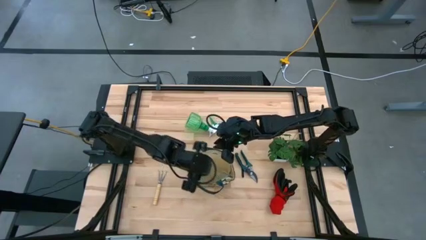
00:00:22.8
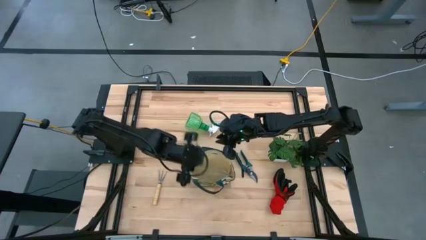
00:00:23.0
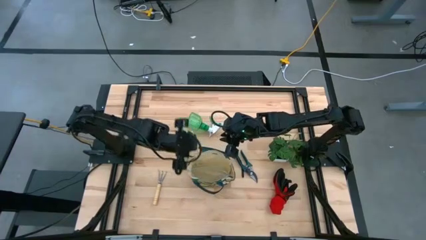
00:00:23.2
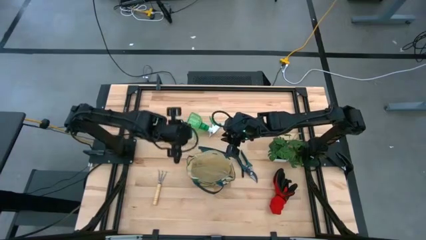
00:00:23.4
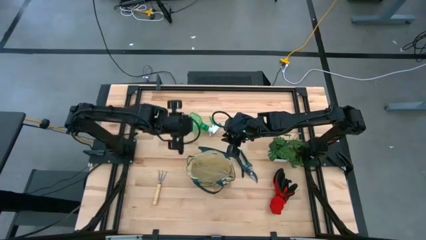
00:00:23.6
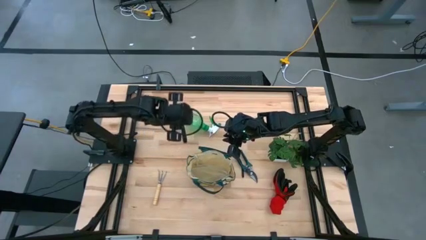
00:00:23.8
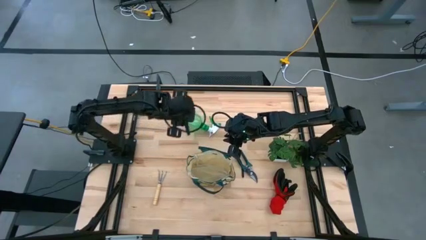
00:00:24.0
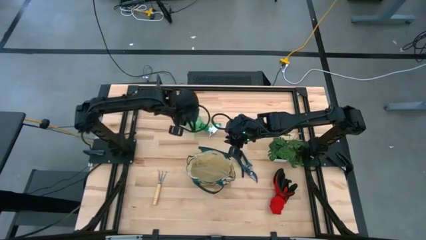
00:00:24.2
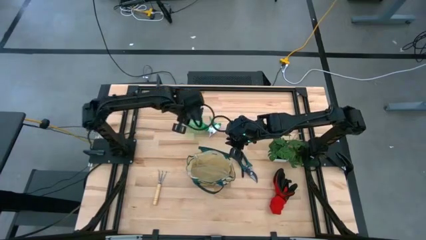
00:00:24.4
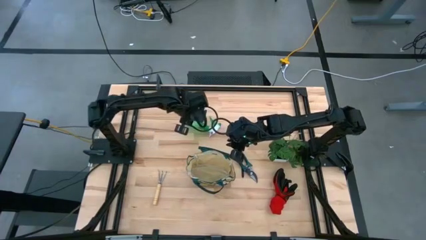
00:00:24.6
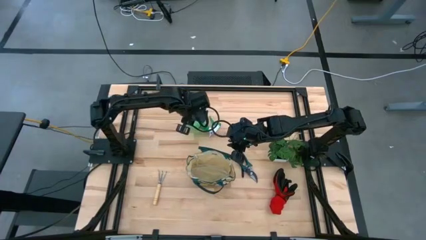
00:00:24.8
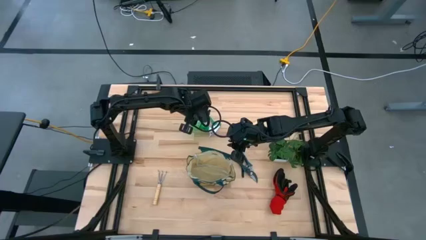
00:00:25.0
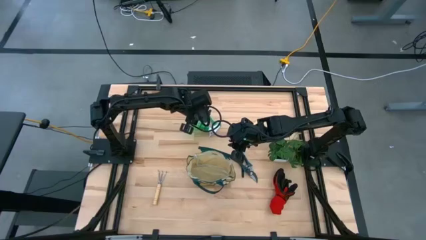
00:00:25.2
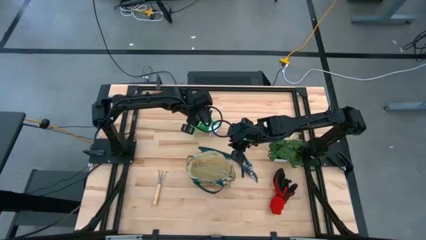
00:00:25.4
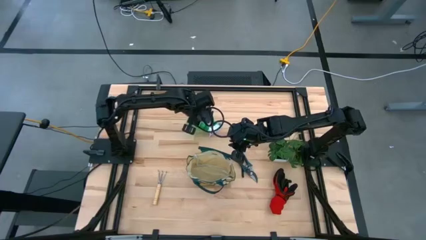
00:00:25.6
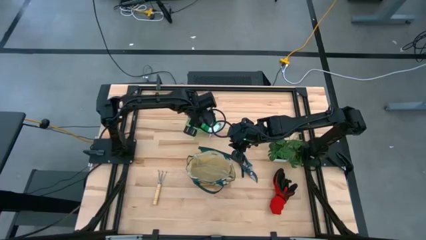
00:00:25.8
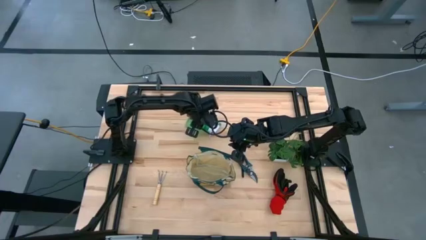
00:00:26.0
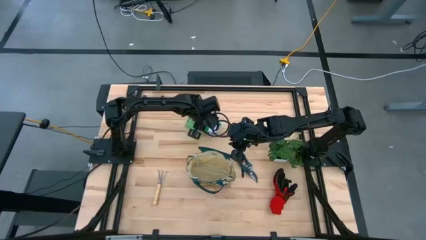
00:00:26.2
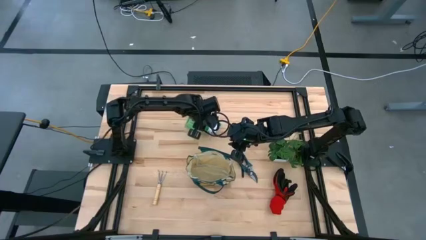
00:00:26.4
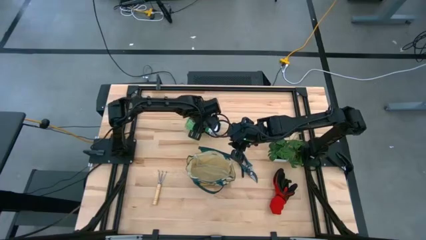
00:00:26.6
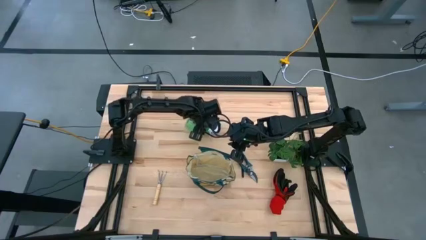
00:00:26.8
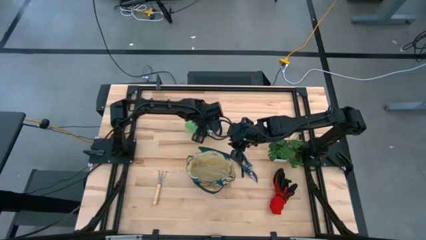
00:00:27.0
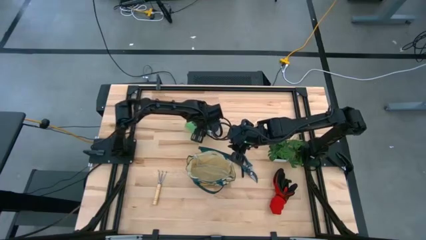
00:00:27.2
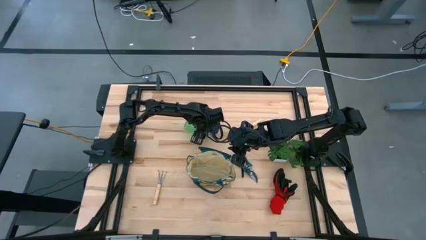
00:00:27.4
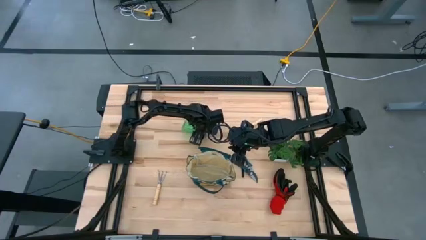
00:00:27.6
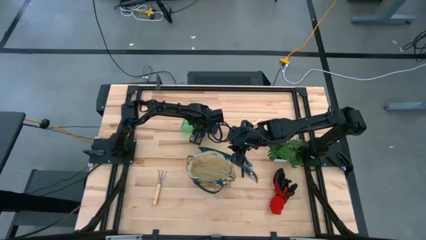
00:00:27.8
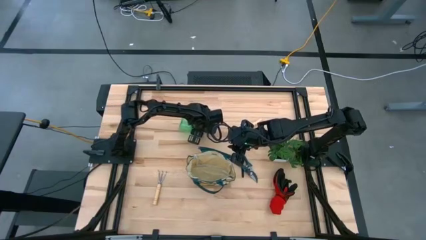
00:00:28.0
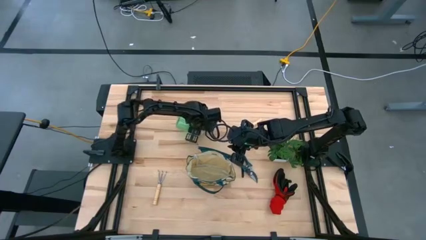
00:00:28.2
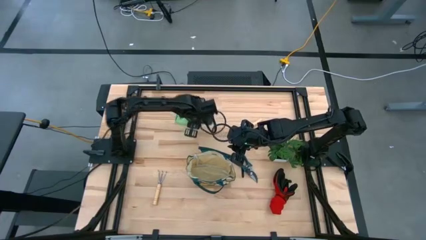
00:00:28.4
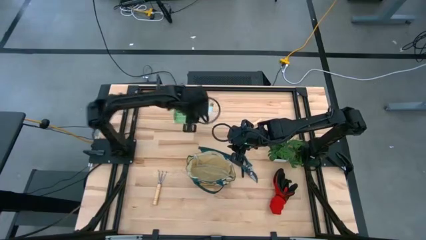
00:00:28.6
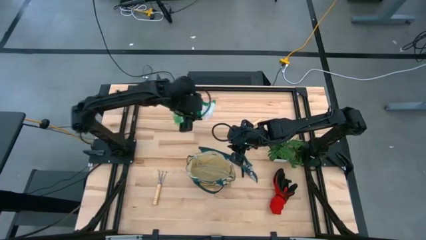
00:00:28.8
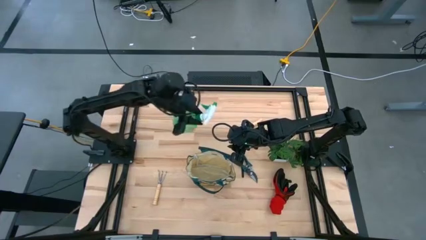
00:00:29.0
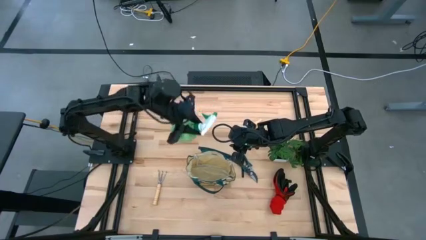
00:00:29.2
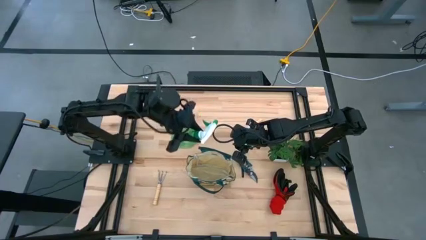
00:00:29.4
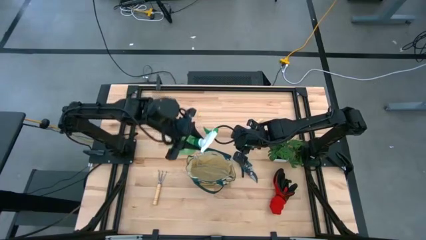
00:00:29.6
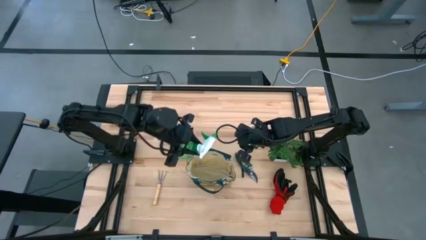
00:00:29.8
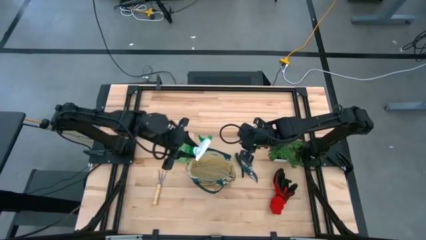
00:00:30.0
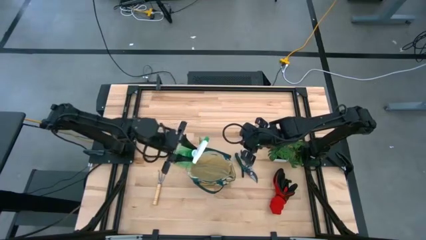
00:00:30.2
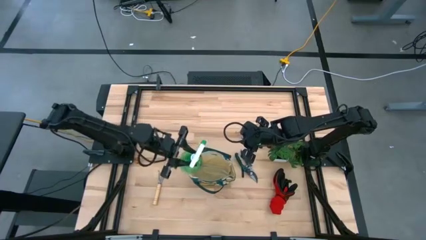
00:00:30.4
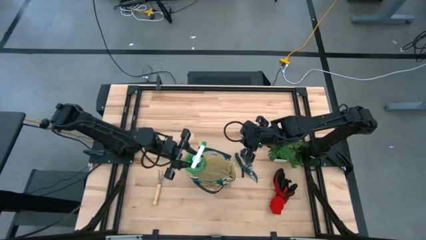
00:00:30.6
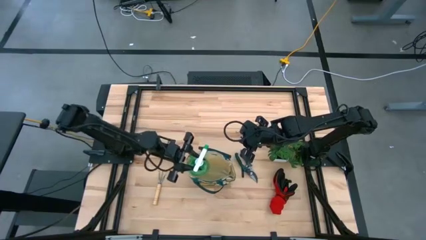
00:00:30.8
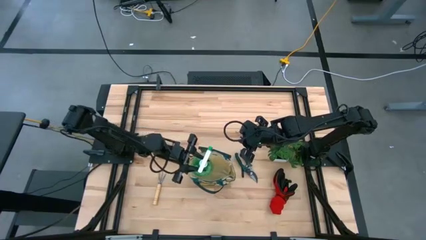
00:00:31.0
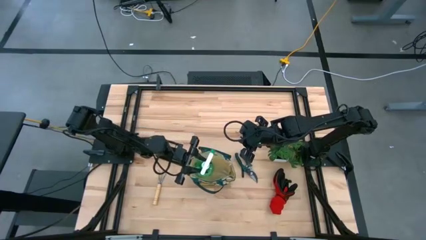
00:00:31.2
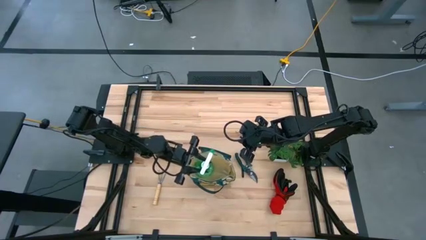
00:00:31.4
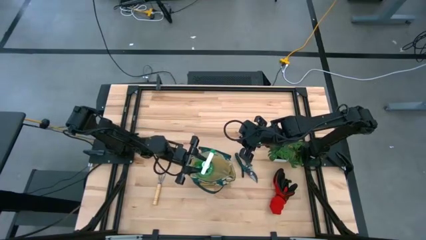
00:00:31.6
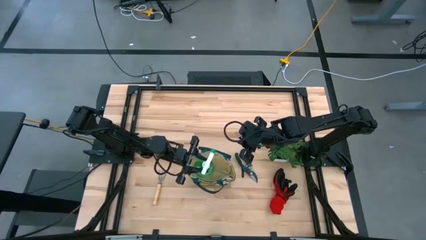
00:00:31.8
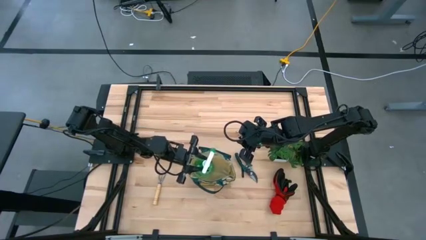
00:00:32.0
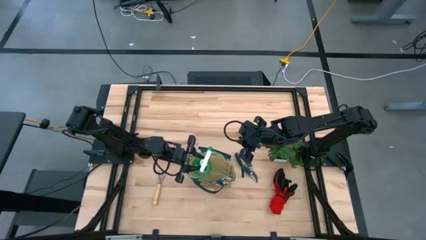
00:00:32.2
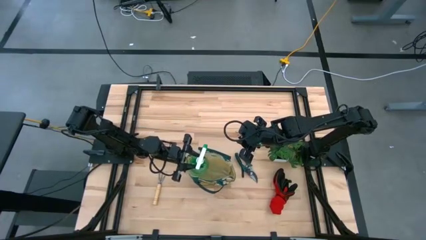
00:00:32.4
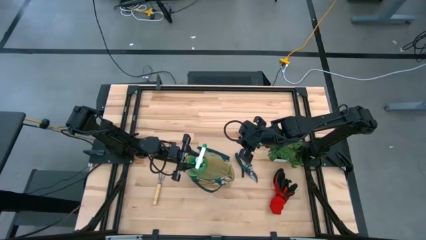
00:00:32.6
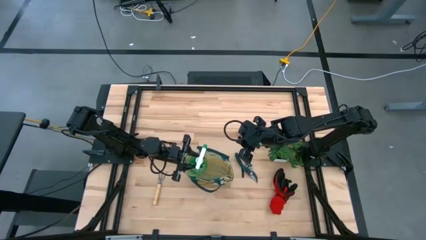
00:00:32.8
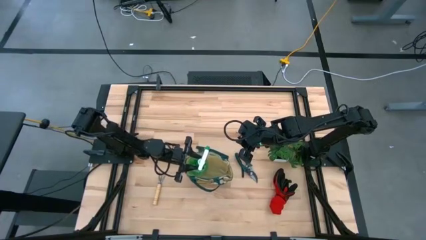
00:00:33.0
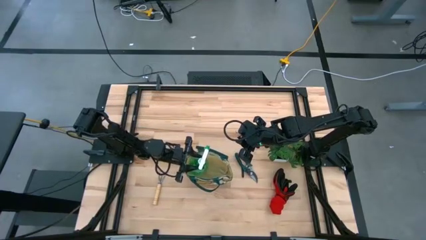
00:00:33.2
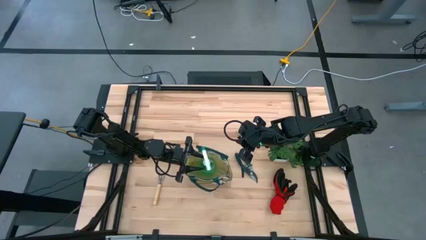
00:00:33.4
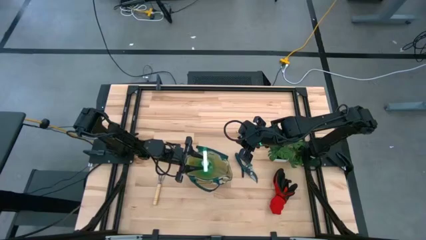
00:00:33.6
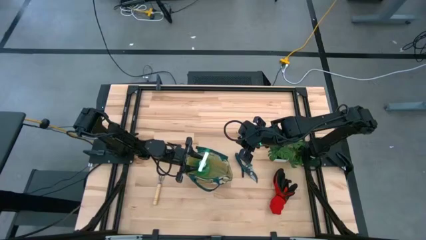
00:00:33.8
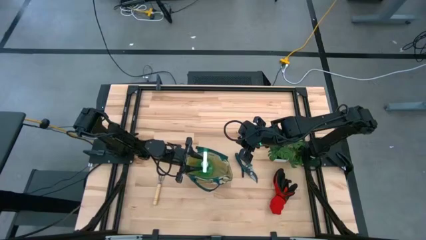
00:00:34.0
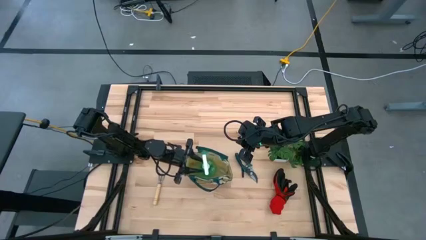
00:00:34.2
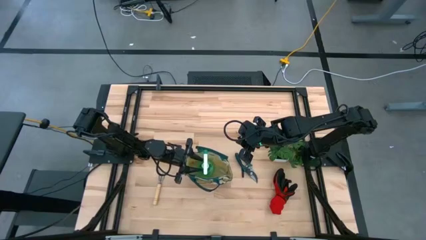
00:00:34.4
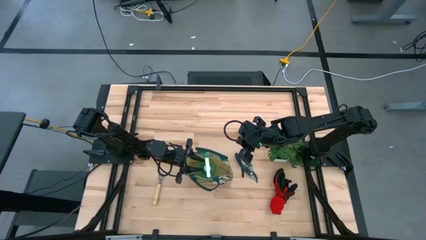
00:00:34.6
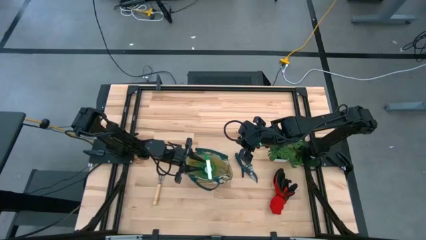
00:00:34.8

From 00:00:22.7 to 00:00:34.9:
Task: Pick & Place Garden tools in Gardening bag
Put the green spray bottle into the gardening bag

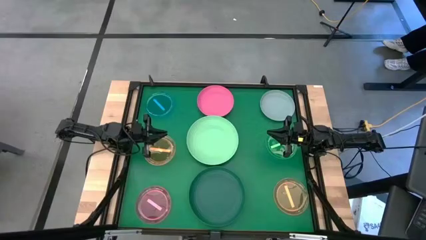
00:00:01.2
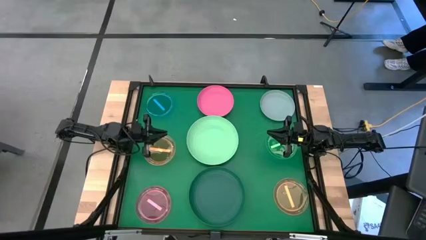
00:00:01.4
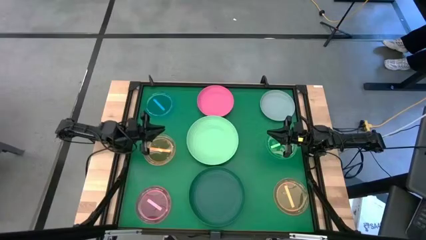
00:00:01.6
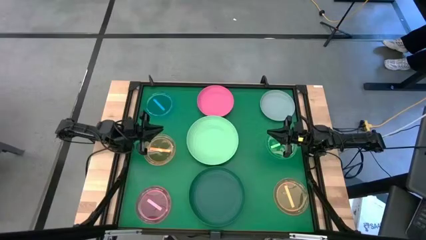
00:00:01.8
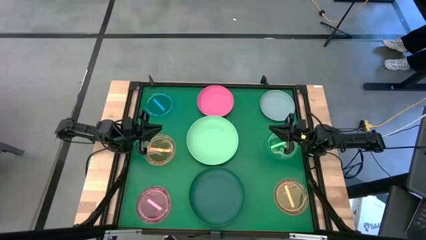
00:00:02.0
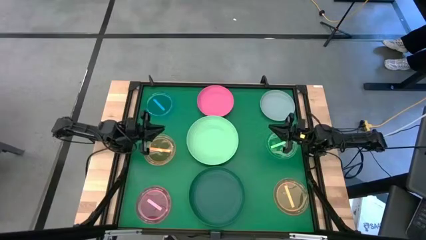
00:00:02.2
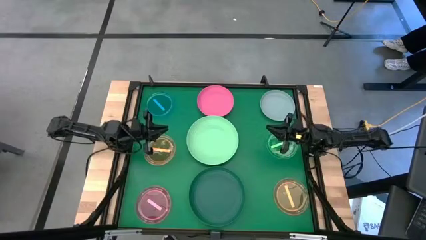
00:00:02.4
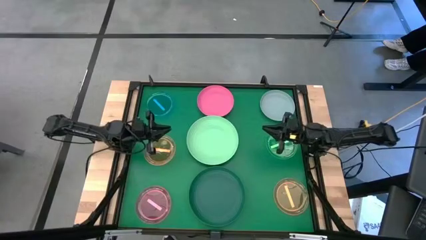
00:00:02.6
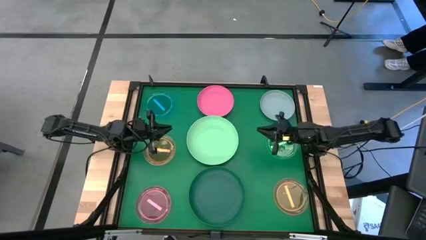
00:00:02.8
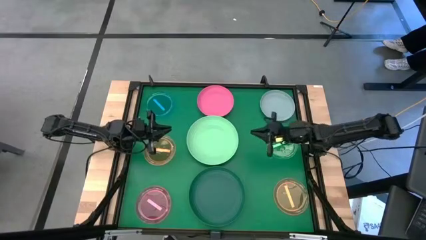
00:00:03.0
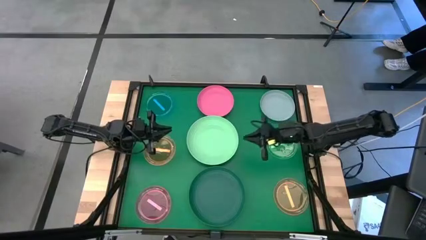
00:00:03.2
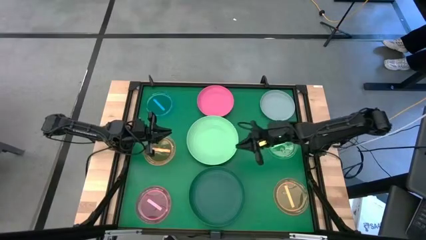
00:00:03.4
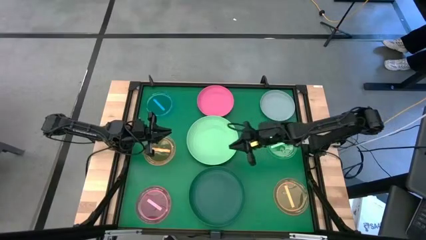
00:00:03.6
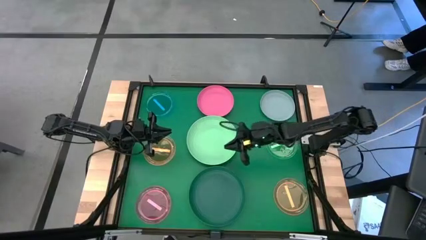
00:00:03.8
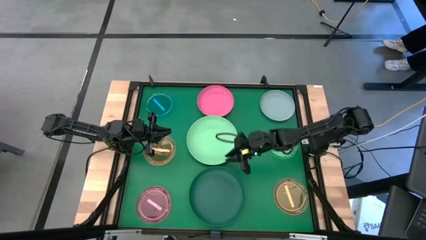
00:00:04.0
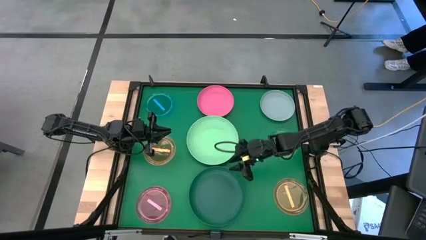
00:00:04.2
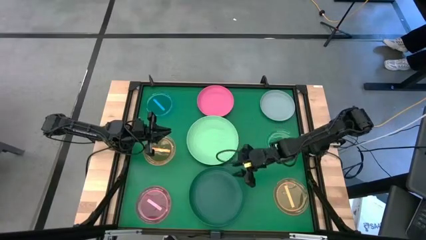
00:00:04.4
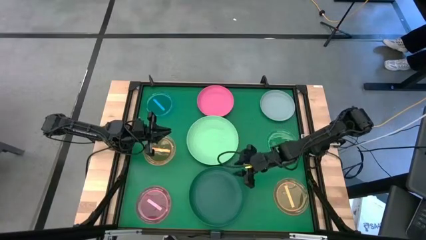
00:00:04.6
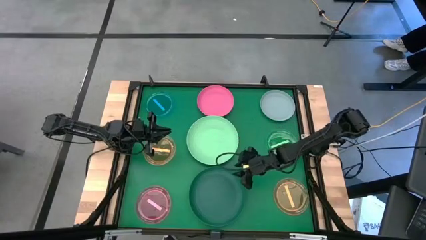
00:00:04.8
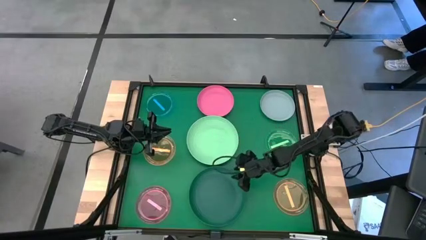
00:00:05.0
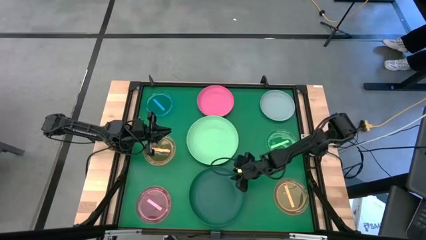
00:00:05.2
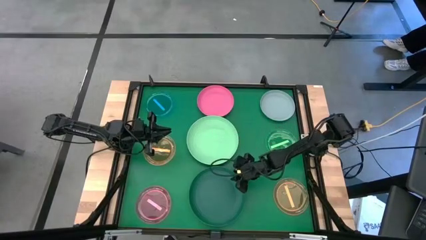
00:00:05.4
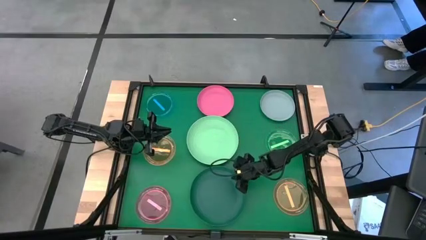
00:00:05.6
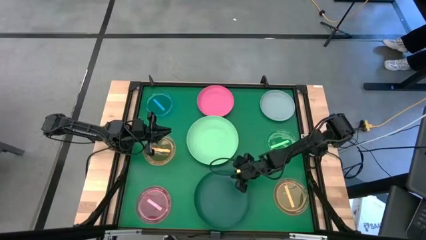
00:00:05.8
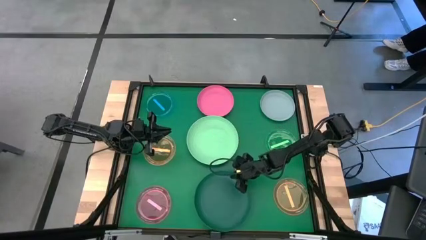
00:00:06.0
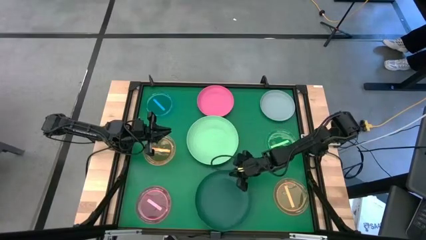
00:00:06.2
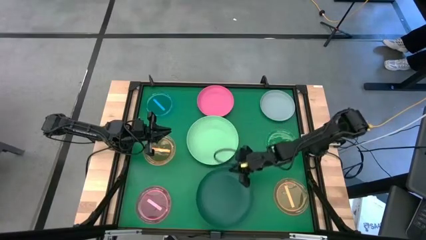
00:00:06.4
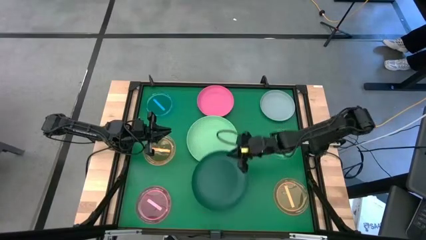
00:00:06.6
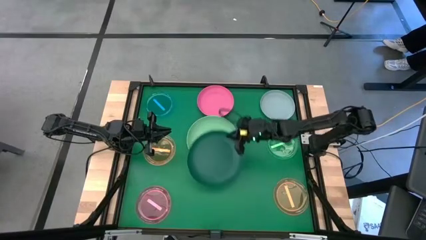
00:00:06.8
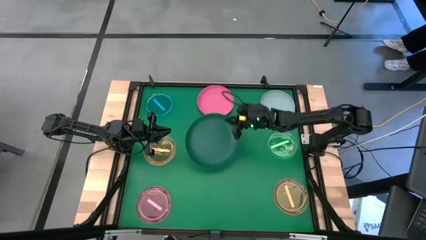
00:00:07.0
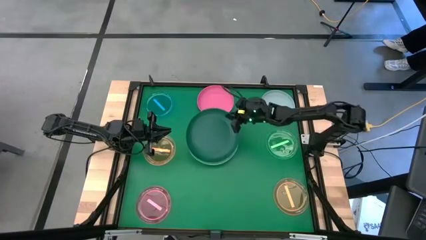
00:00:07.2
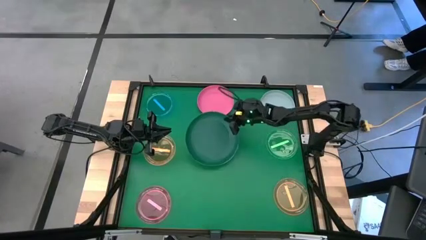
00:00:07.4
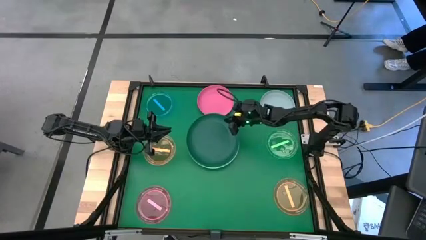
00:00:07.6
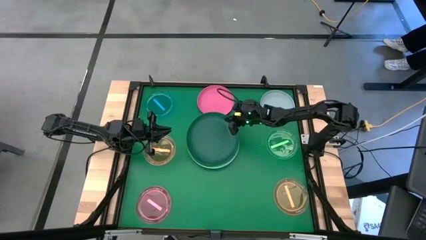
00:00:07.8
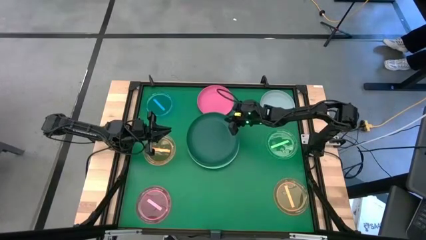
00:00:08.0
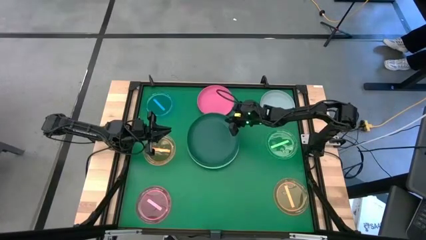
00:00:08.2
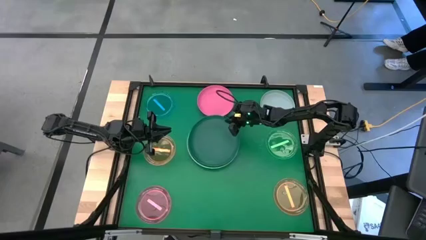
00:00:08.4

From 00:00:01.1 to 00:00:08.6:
Task: Stack plastic plates
Stack the large dark green plate on top of the large light green plate
